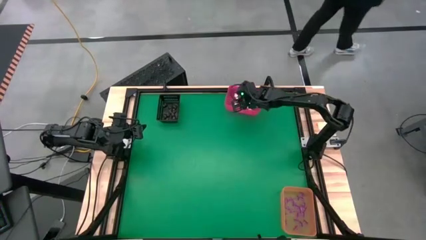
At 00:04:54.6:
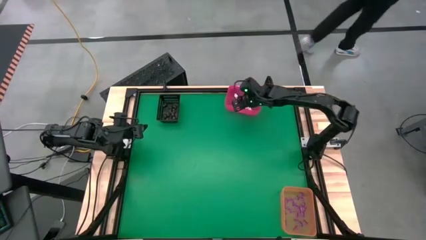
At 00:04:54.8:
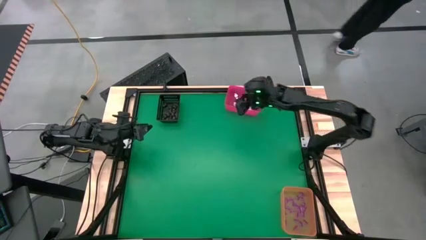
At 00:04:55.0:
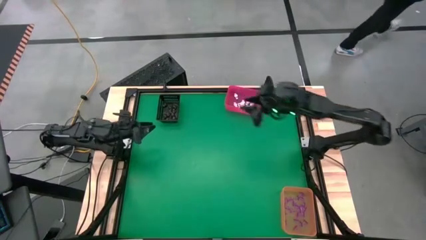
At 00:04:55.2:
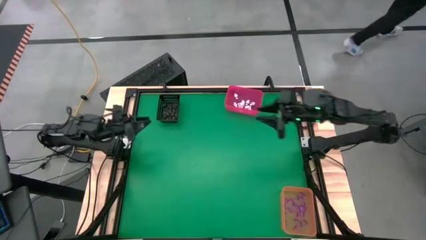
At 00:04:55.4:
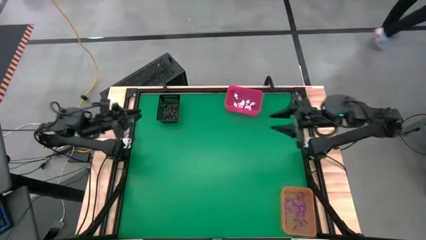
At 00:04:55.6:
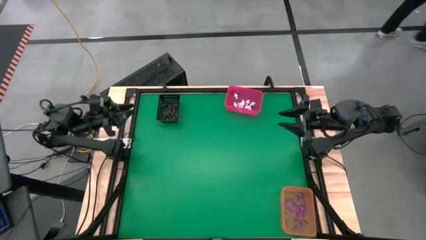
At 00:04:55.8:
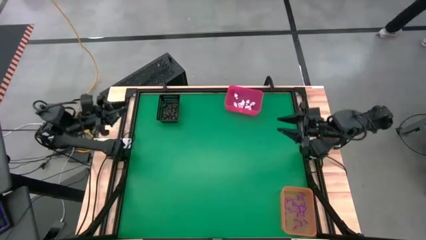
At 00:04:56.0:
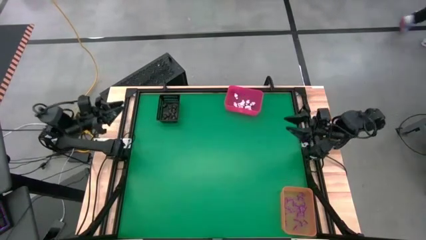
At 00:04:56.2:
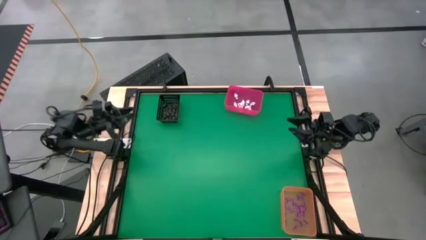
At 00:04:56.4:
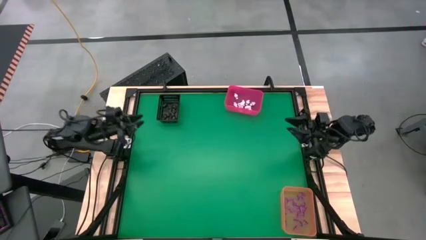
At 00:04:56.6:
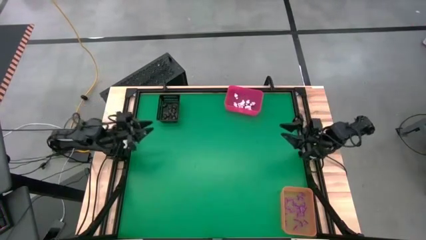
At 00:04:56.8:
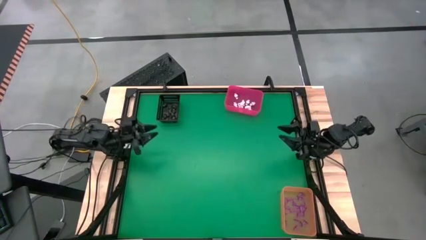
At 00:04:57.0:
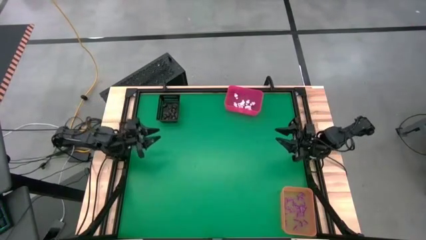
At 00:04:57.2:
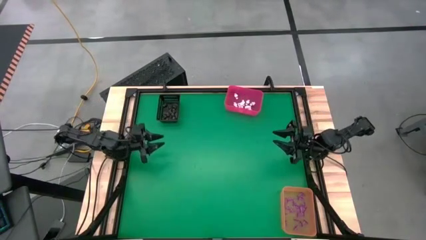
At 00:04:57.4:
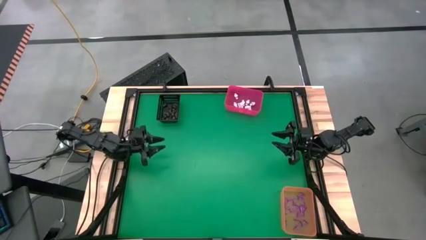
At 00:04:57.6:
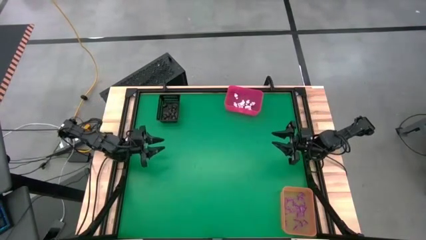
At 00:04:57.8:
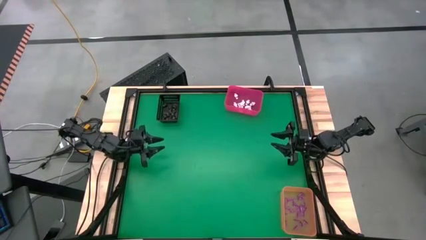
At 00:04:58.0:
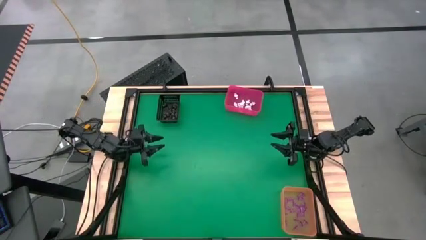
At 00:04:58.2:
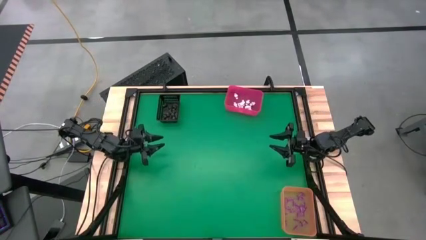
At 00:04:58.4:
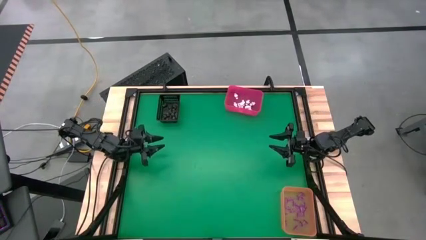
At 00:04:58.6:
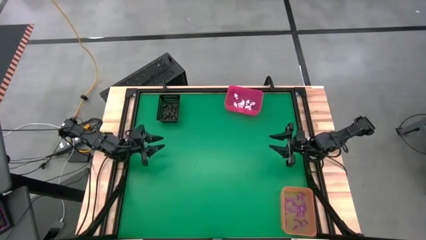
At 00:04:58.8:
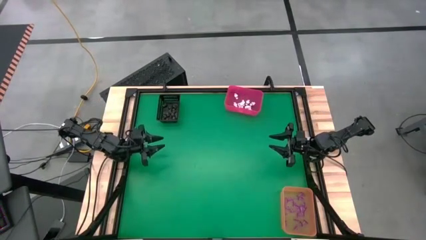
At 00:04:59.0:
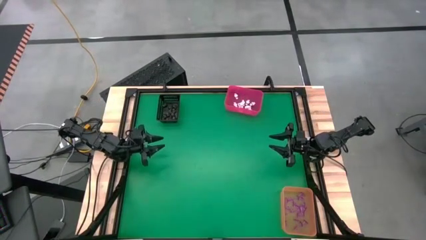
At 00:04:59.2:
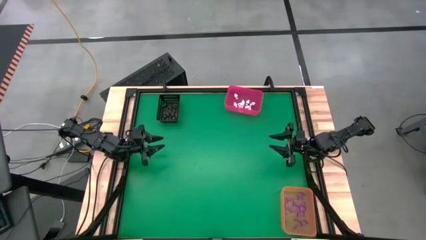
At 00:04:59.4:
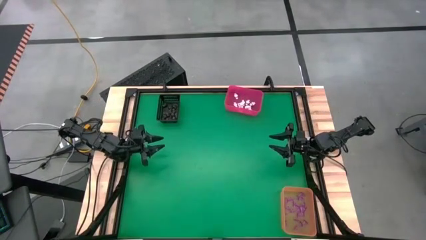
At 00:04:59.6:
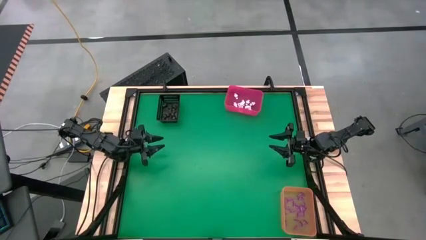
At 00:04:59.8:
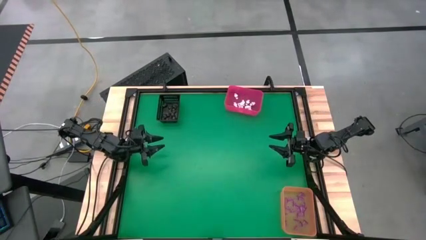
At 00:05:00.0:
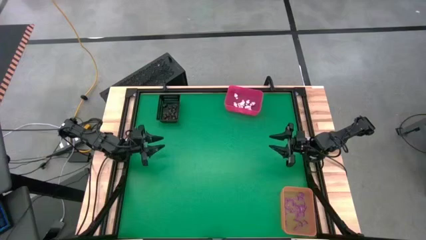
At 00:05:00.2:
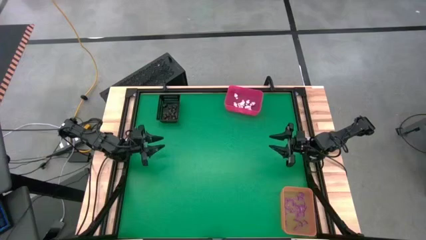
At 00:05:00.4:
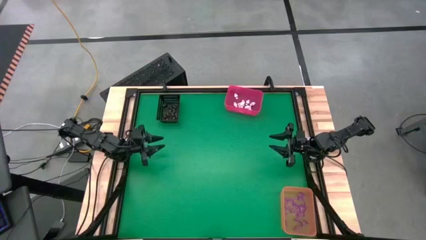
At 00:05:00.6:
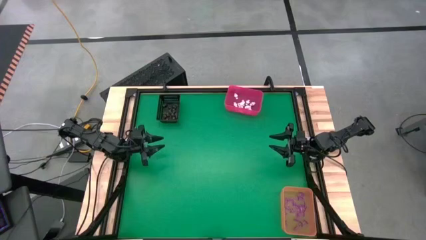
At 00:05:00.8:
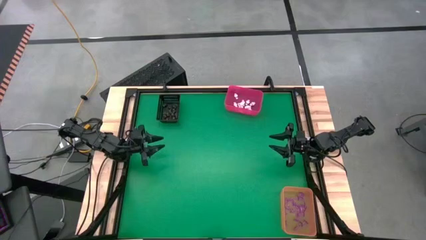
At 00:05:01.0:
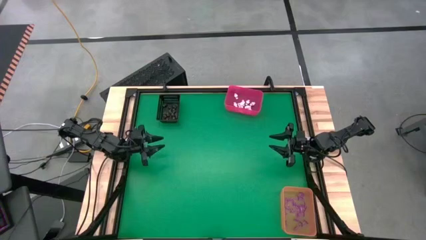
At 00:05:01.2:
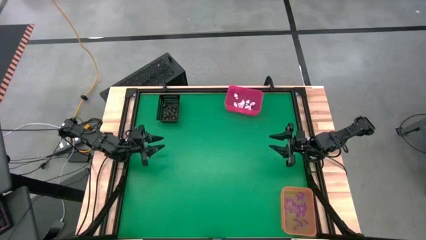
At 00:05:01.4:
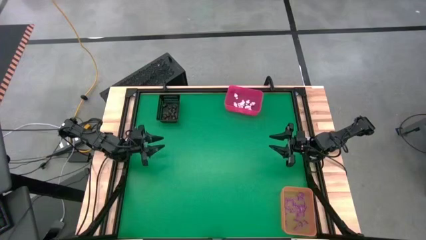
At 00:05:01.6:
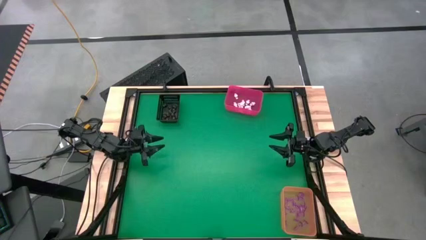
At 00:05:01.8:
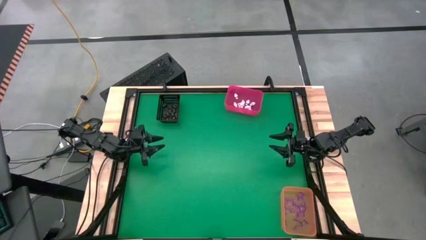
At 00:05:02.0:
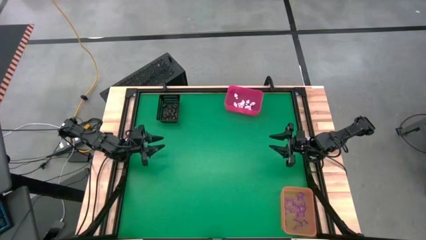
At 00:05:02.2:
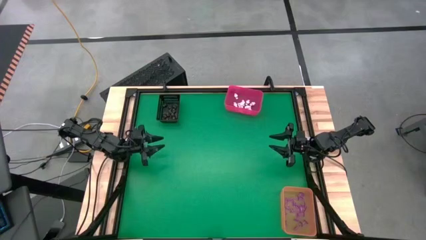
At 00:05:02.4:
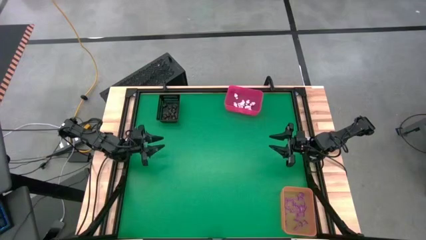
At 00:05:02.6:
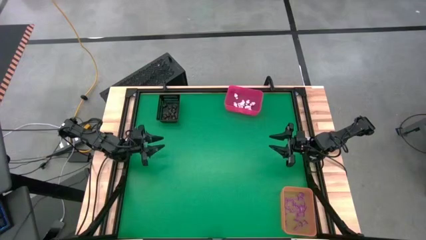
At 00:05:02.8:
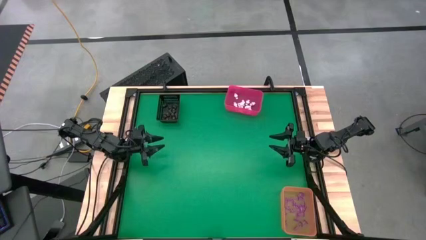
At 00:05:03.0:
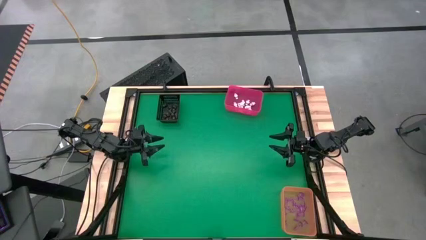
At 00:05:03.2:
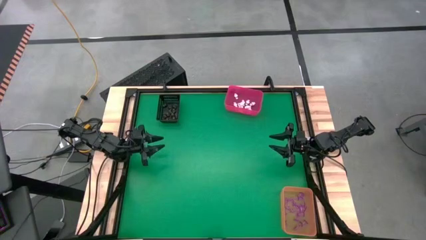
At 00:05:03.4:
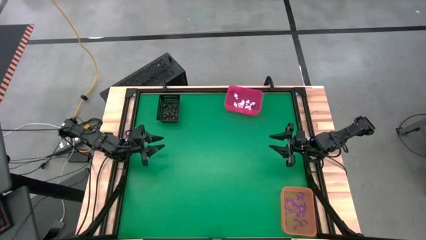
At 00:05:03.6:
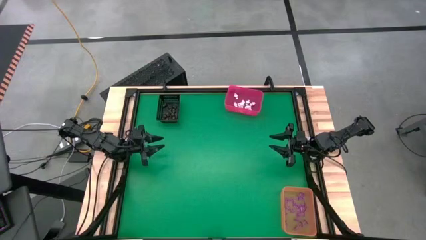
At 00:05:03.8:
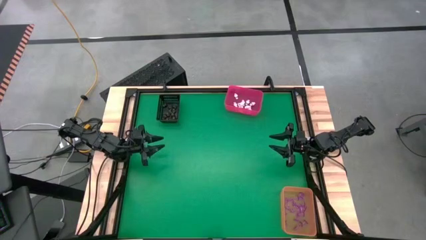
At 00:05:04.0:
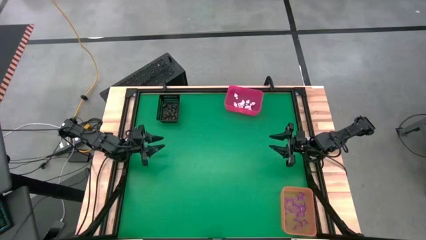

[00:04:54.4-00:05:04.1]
Task: Sort Halloween decoration
Return to Home Position

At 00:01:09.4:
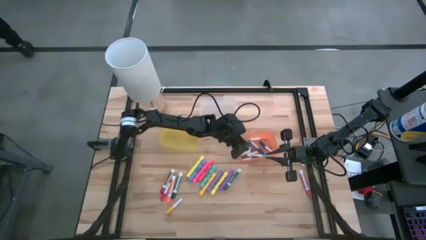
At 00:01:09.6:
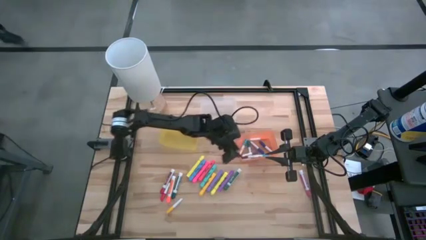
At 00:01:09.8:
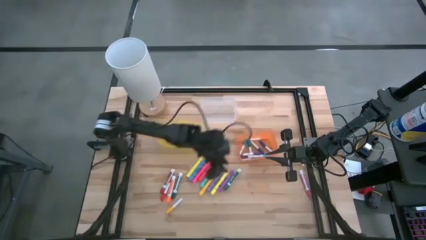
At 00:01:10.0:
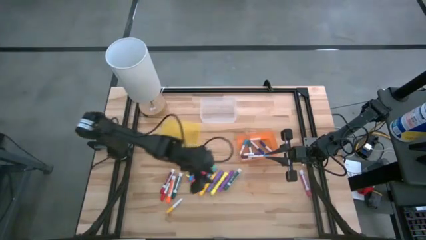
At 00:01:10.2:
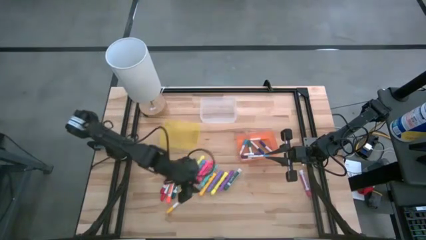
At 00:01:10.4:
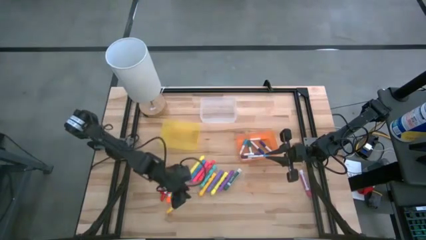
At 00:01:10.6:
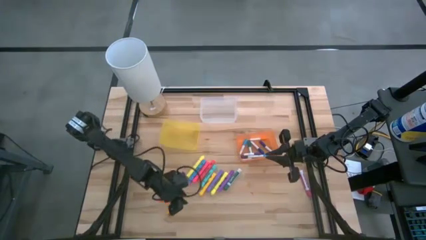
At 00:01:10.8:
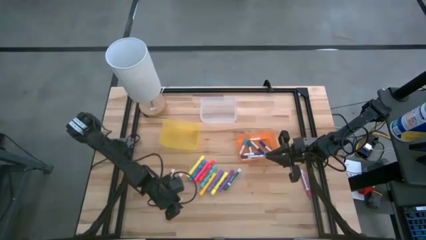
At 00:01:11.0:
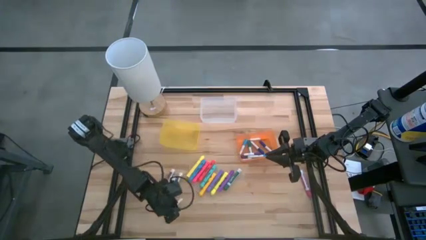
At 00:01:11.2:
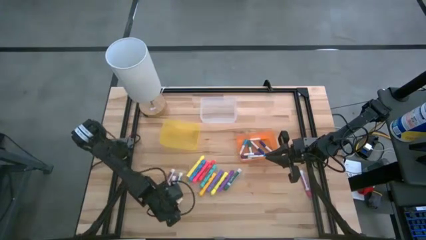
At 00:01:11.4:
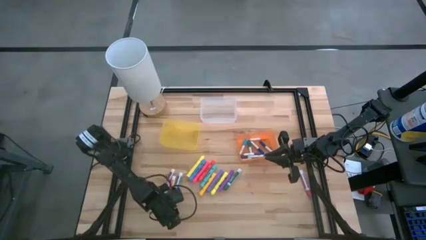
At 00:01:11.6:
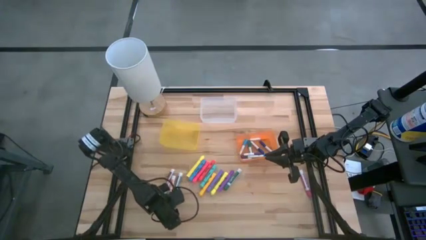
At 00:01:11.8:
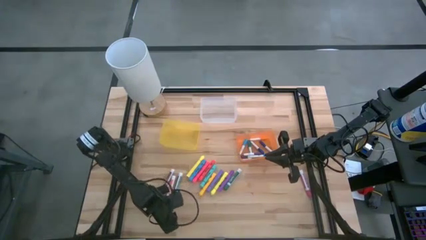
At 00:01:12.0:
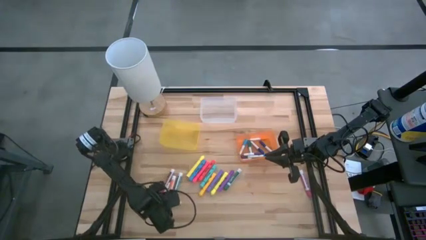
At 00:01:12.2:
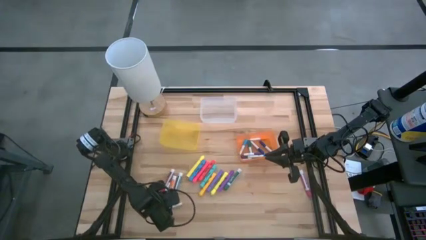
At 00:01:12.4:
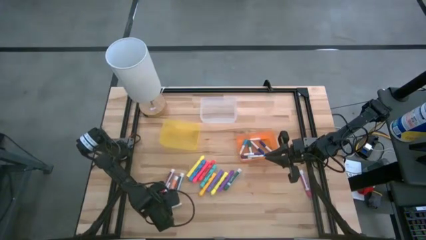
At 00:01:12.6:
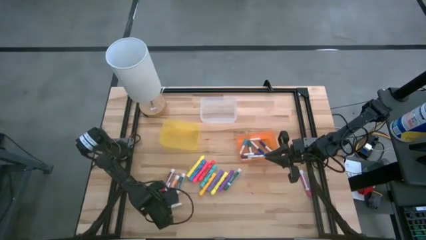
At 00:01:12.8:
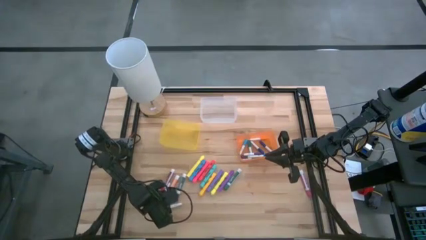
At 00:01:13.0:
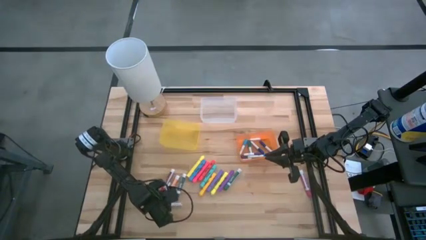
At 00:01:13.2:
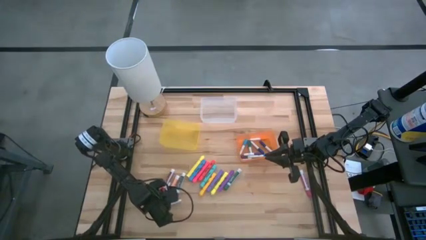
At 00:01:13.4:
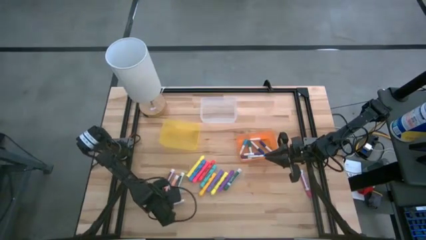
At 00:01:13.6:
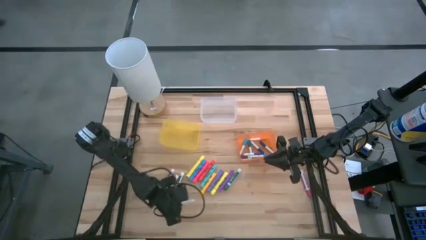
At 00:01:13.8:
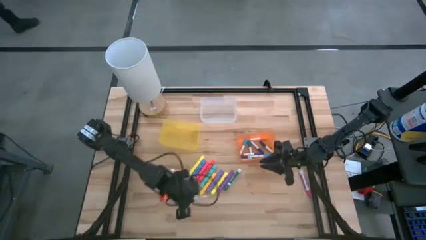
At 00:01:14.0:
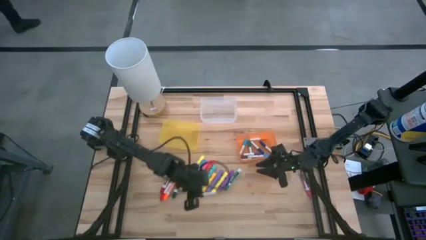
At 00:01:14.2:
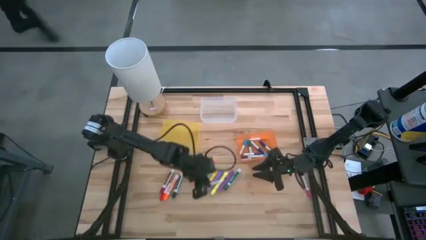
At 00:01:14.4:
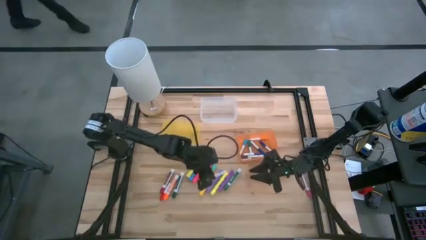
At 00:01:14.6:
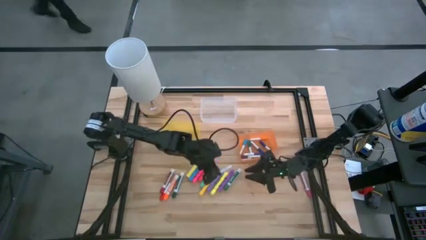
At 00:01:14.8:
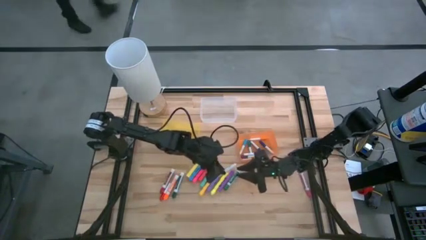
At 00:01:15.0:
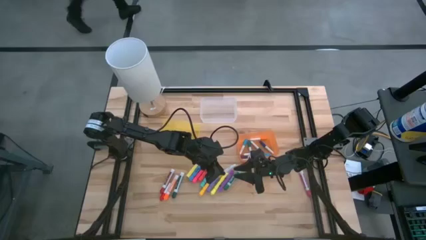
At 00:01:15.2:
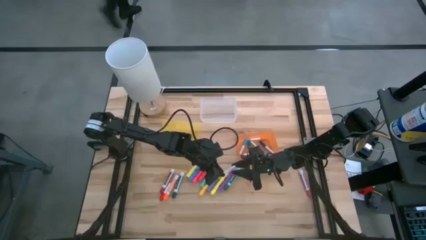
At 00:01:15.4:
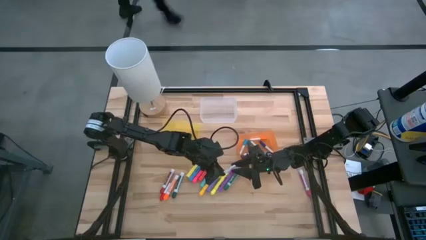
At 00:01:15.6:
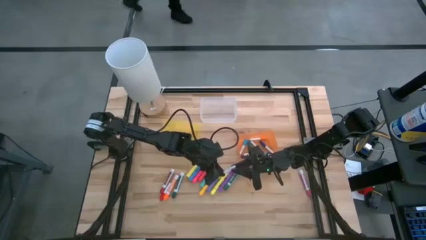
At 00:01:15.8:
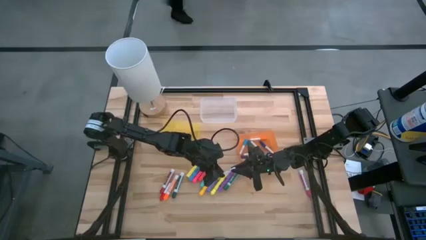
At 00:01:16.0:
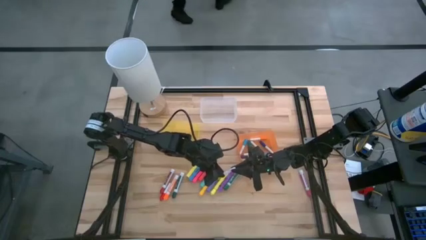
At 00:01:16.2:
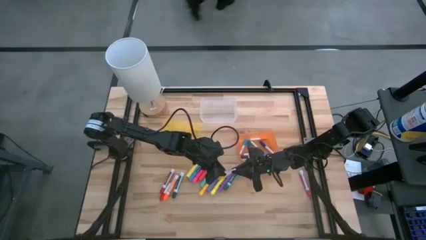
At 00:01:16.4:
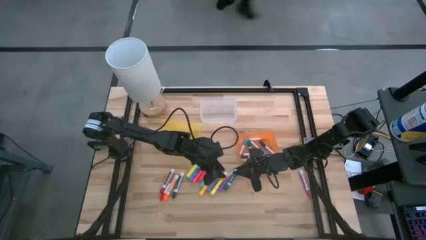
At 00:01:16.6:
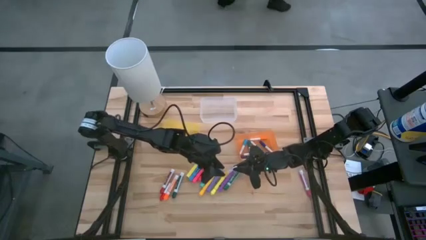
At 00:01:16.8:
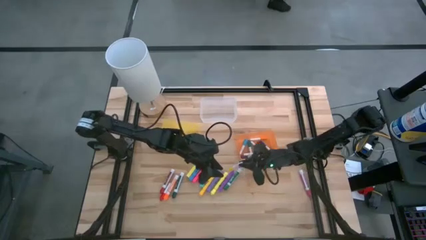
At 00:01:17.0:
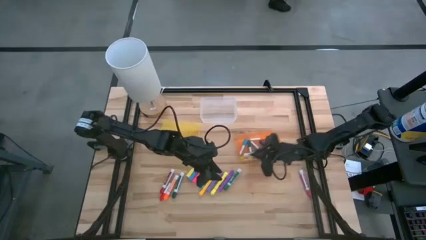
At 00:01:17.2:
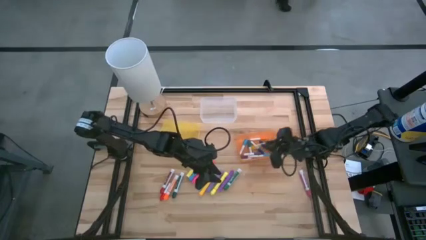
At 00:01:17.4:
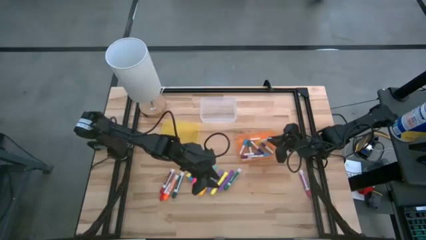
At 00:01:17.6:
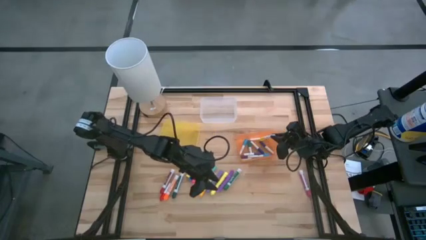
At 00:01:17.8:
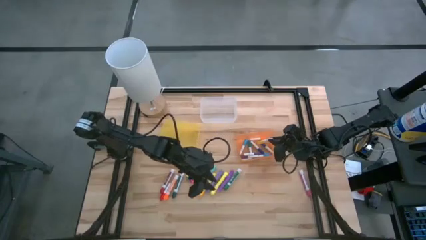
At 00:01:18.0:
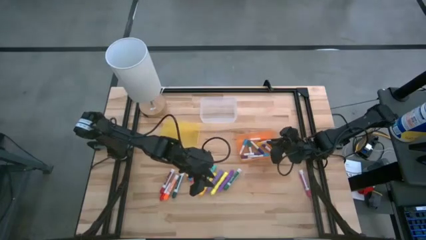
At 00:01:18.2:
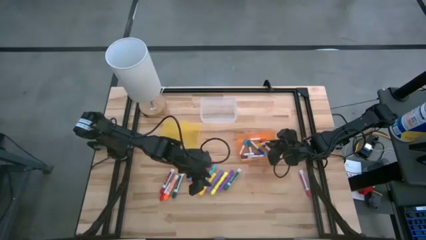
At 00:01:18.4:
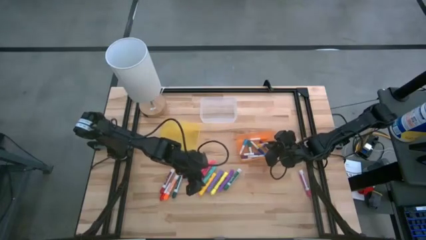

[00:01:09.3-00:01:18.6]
Task: Pick & Place Markers
Put the small yellow highlighter pen into the orange bin
